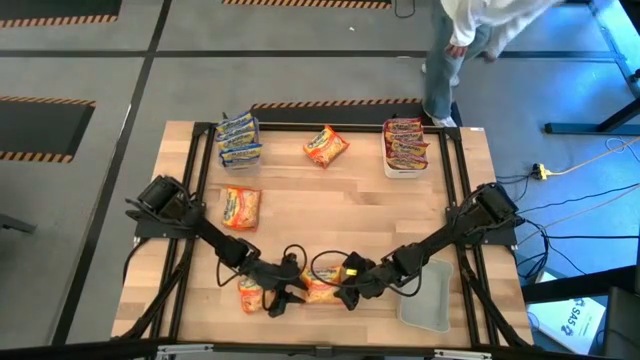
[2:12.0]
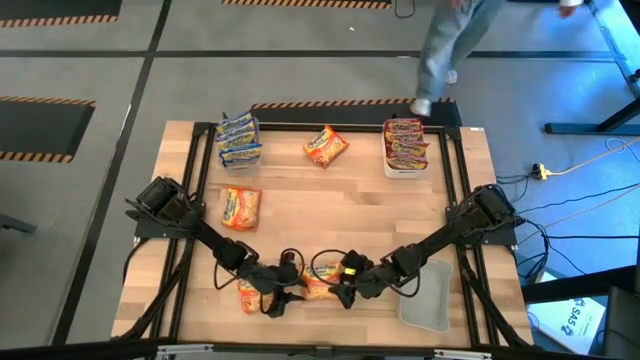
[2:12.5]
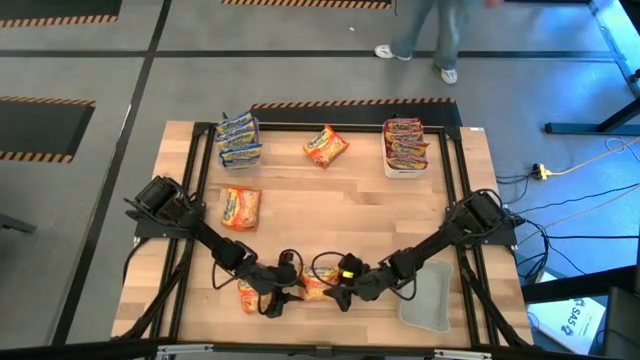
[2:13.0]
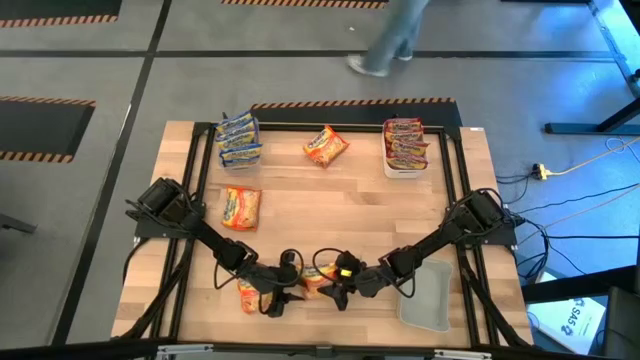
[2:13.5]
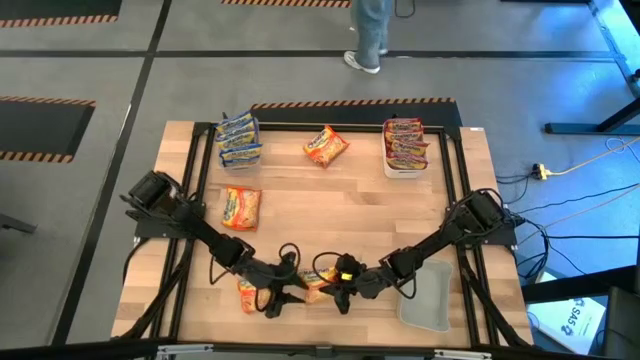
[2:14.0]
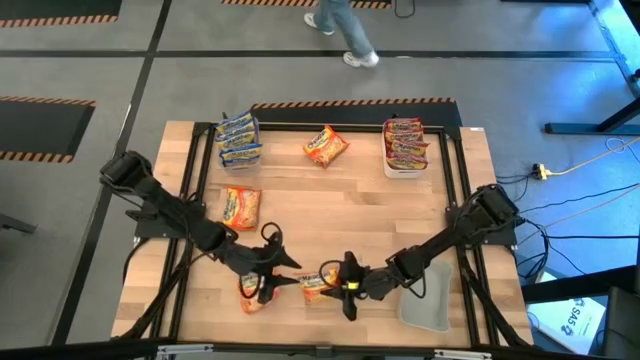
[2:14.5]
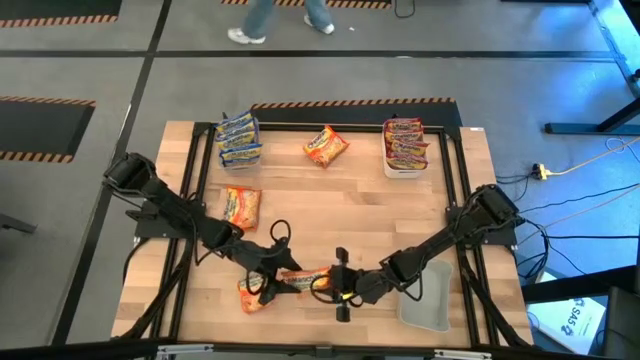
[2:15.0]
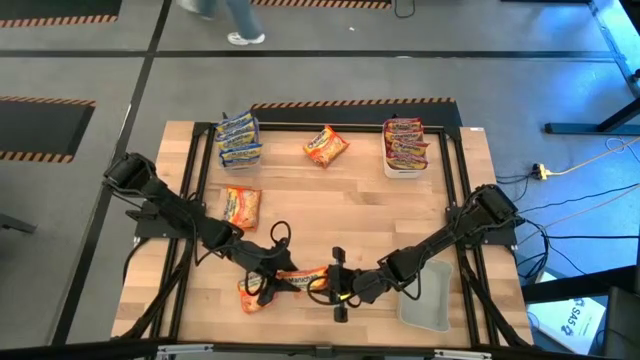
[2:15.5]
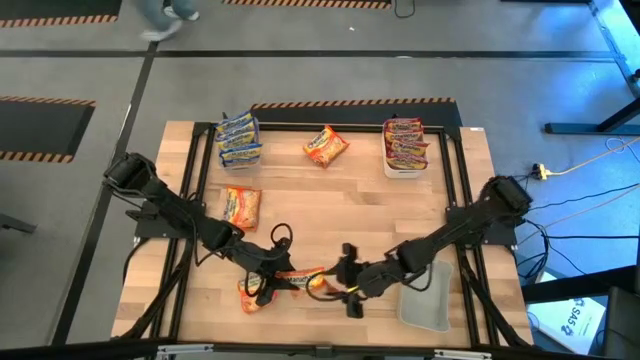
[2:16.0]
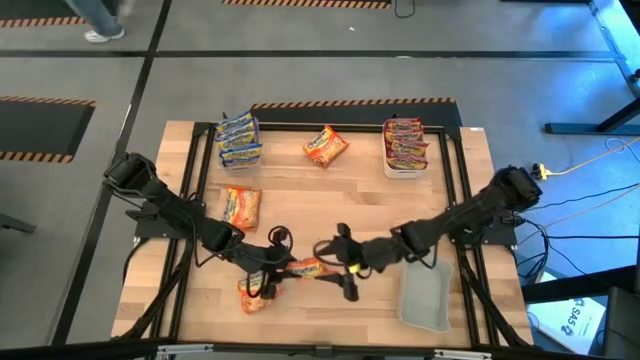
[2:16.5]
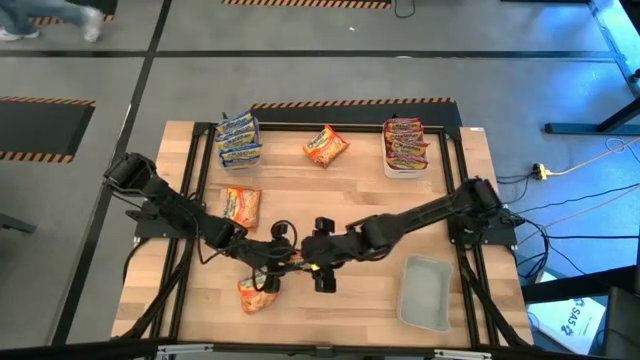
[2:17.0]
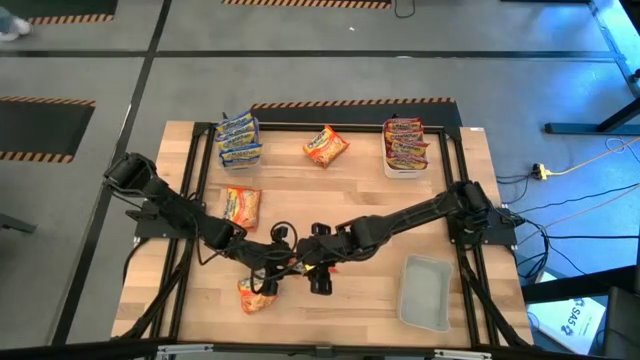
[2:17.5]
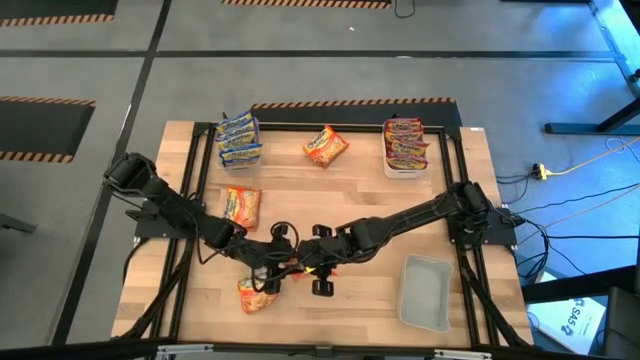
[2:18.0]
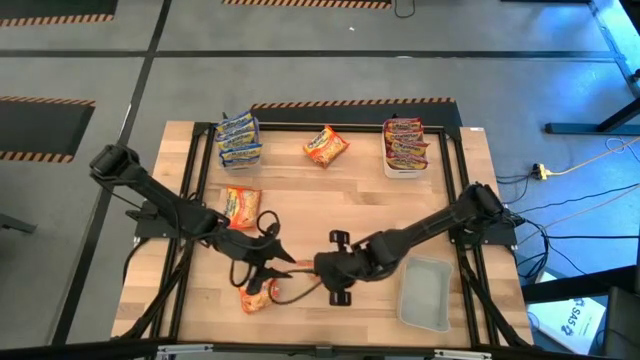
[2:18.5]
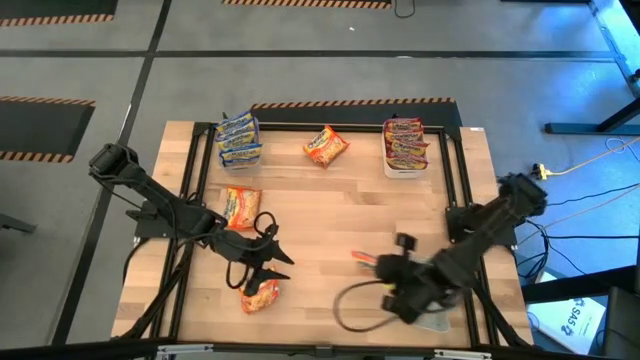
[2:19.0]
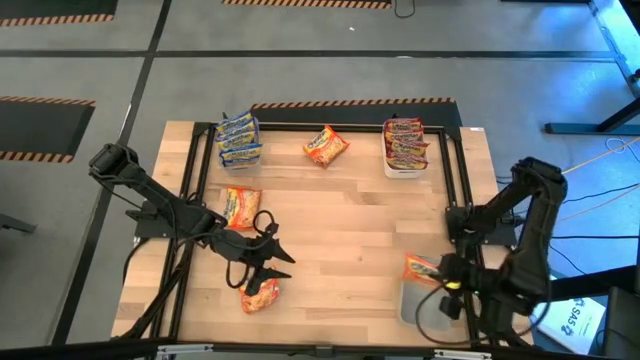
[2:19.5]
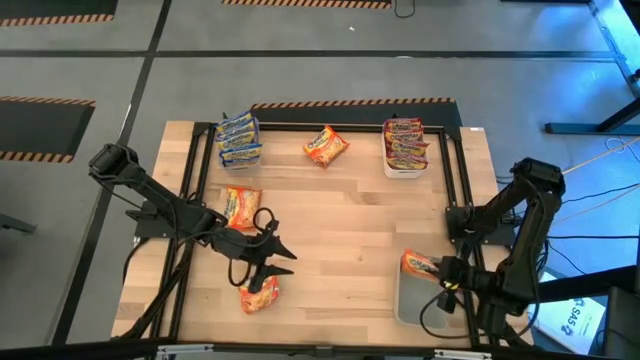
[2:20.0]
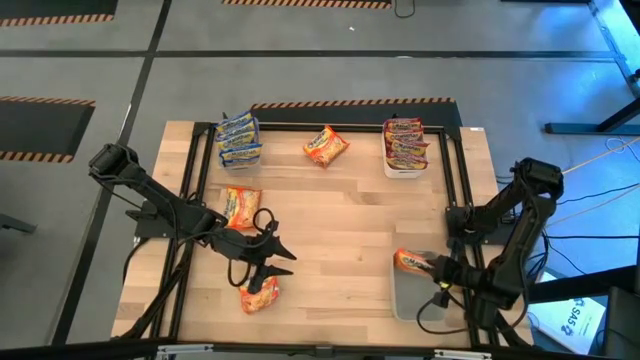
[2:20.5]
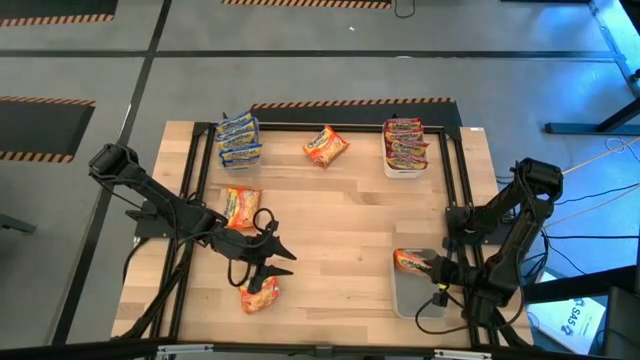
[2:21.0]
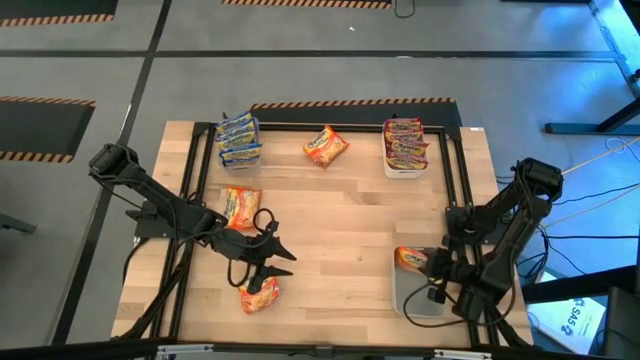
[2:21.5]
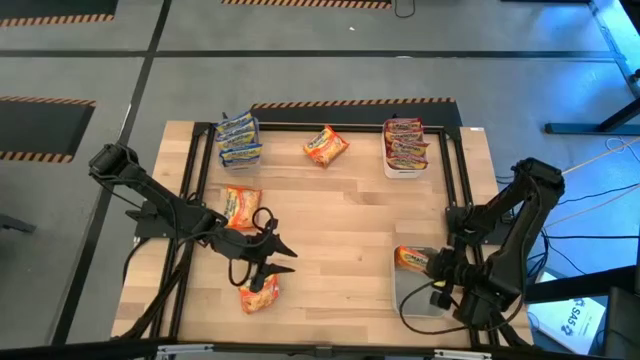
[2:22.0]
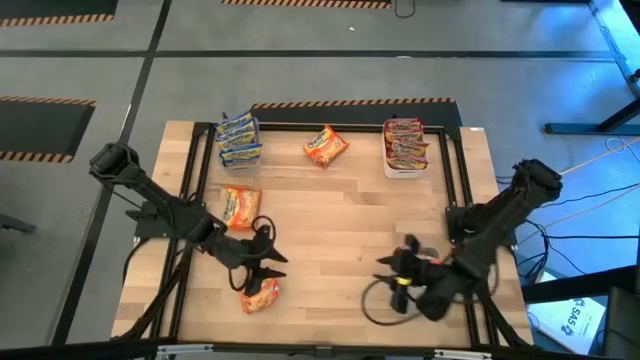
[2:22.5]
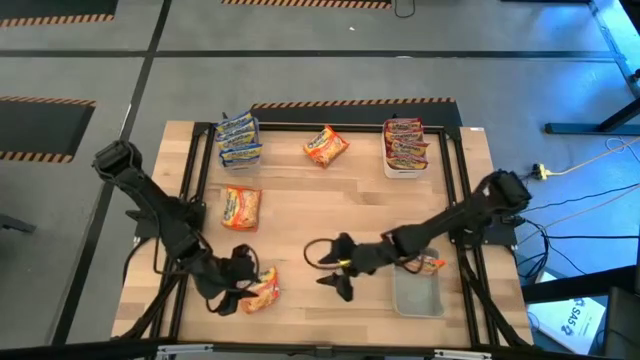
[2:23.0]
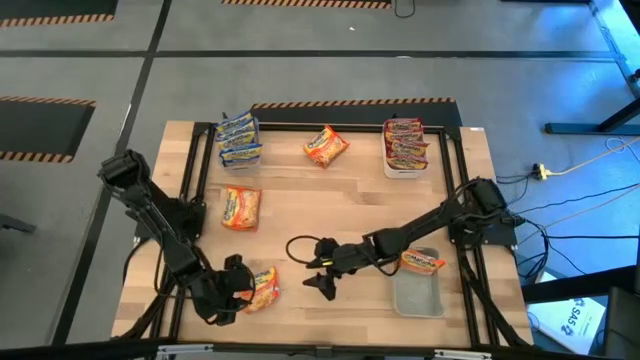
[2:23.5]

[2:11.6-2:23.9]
Task: Sort Maruchan noodles
Put the bottom right orange noodle pack into the gray bin

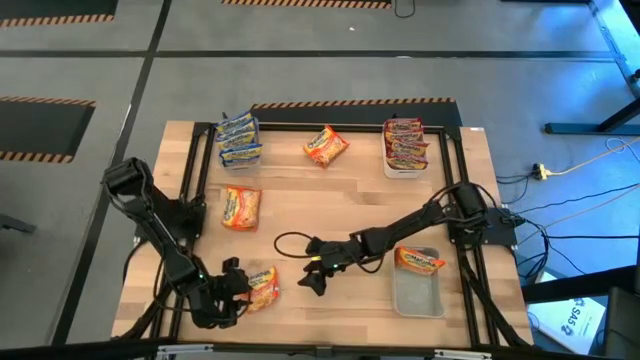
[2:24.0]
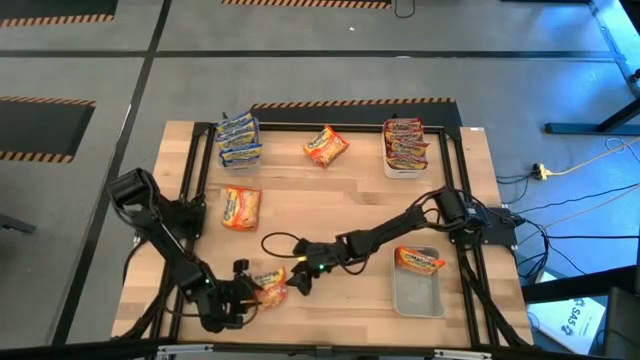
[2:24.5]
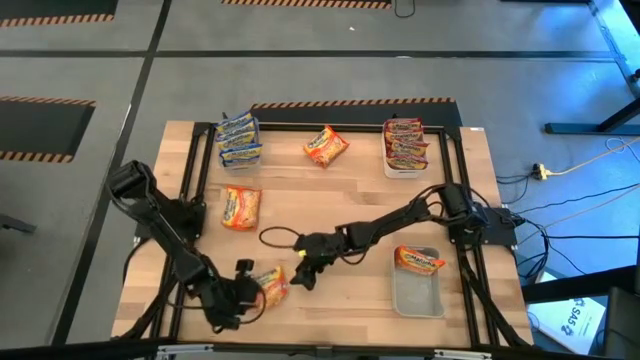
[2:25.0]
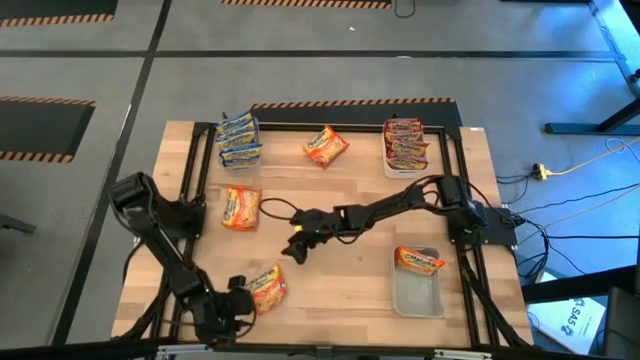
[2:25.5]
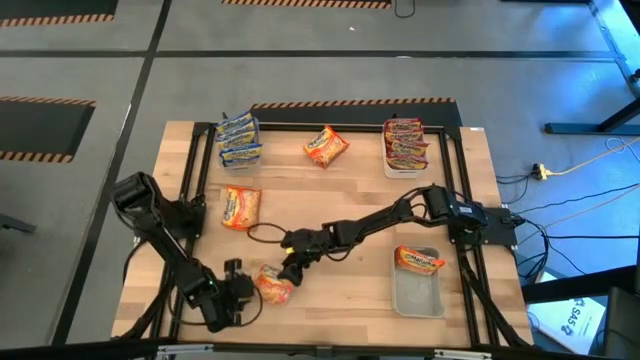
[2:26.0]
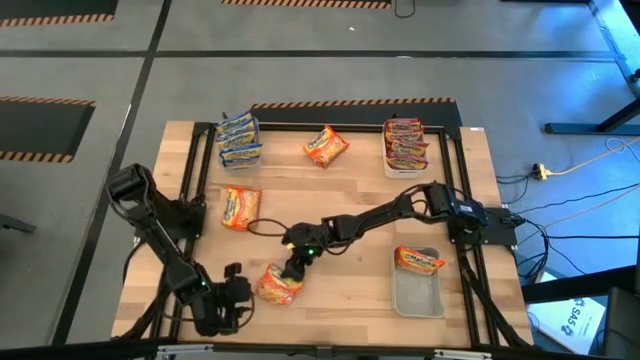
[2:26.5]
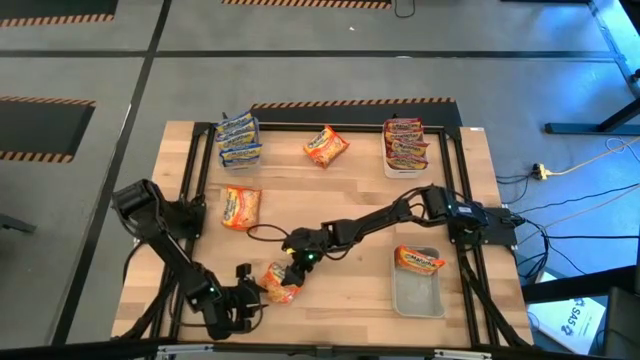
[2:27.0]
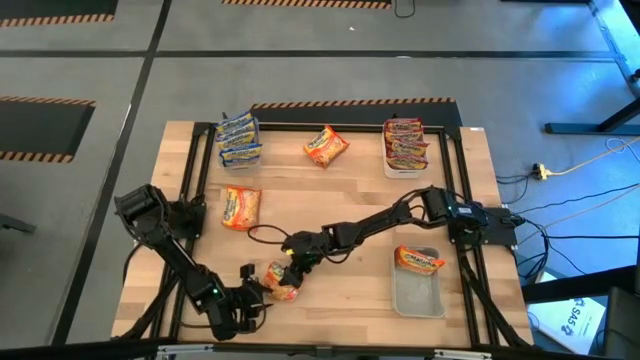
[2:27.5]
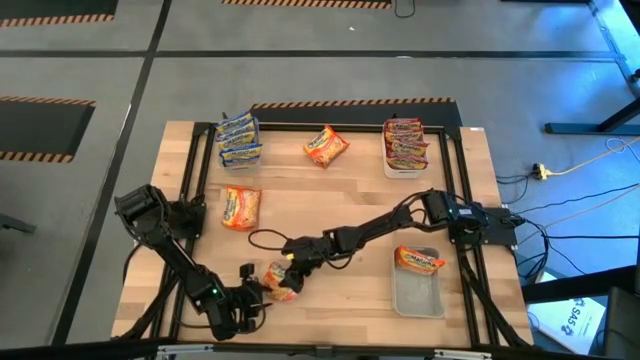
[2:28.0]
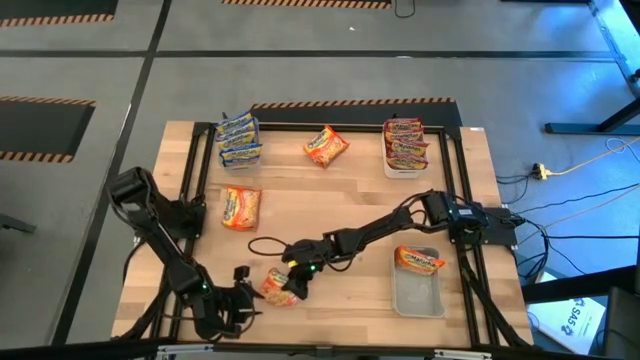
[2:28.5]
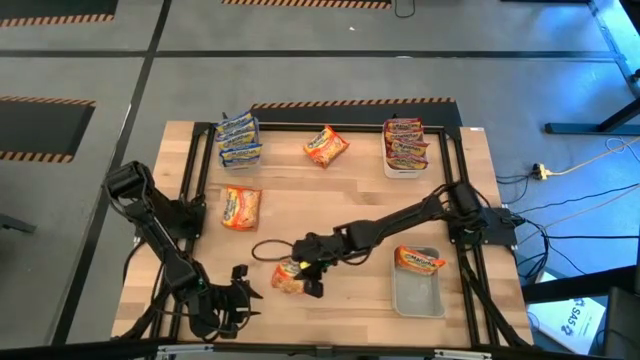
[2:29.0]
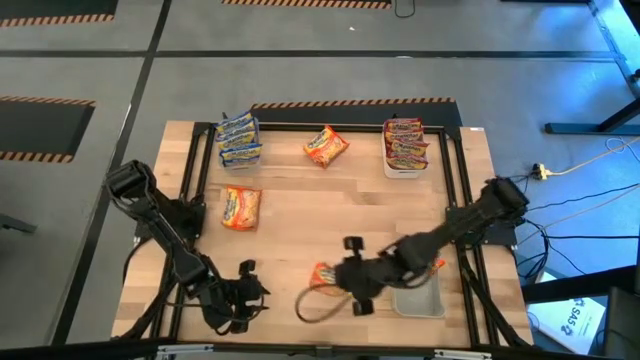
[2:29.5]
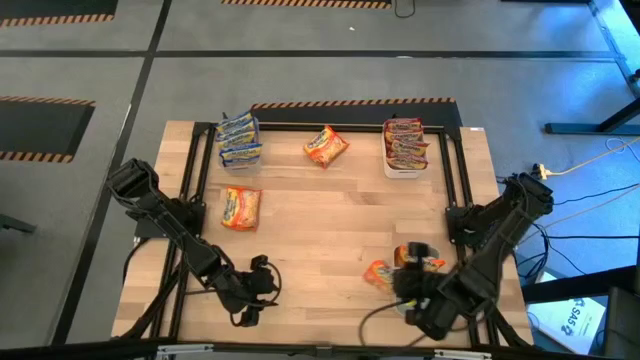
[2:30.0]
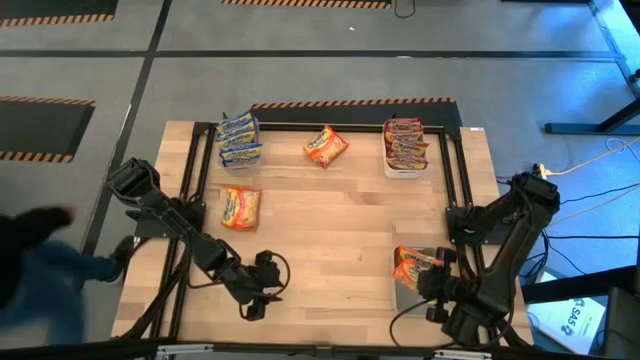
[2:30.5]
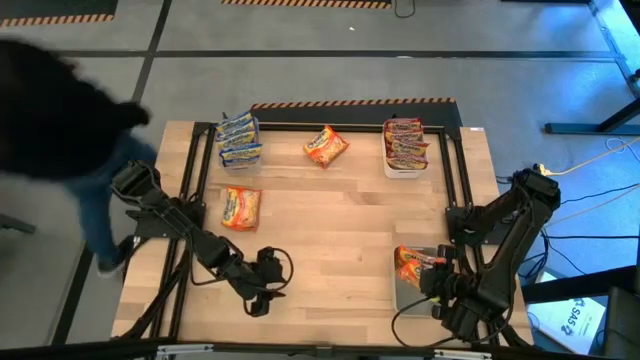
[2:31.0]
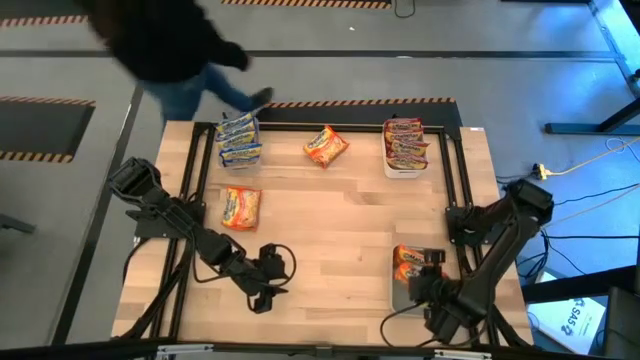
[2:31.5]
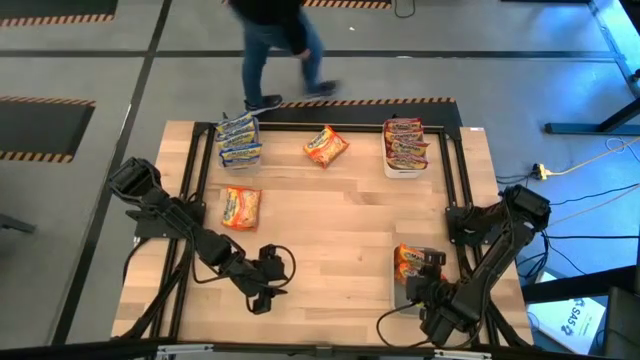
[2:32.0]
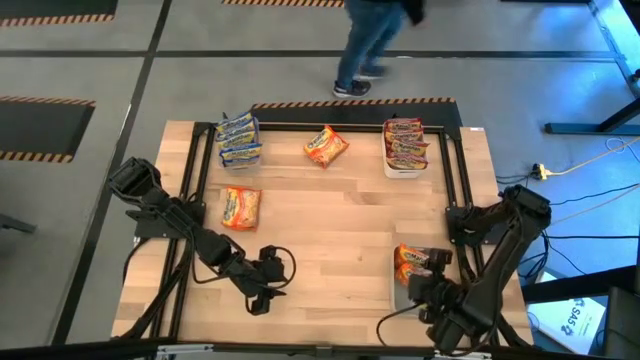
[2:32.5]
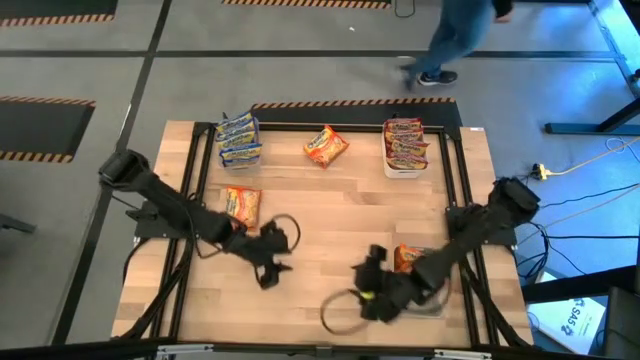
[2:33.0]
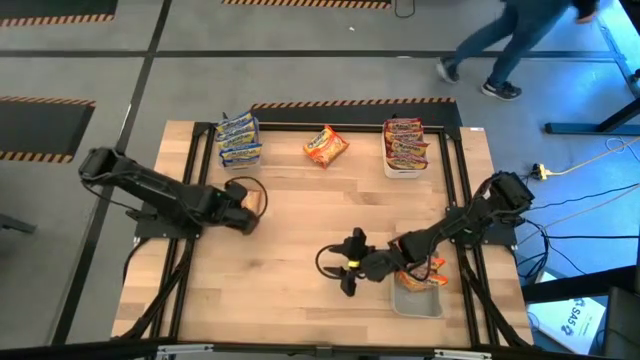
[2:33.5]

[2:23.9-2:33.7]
Put the bottom orange noodle pack into the gray bin
